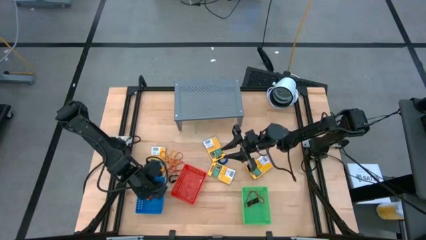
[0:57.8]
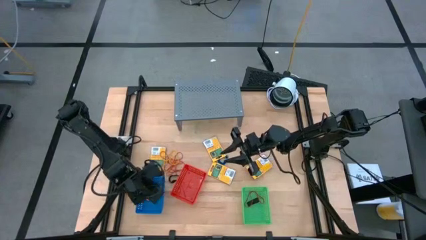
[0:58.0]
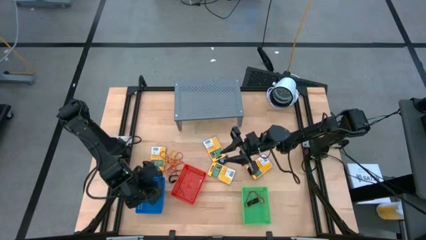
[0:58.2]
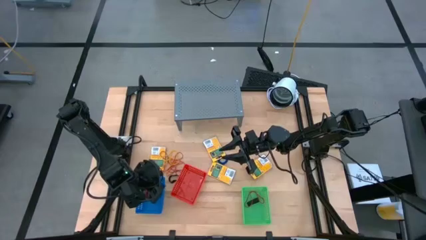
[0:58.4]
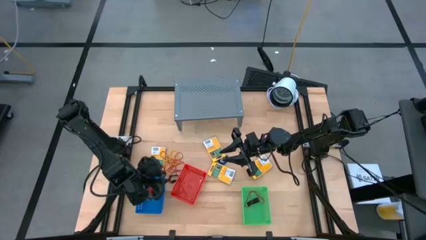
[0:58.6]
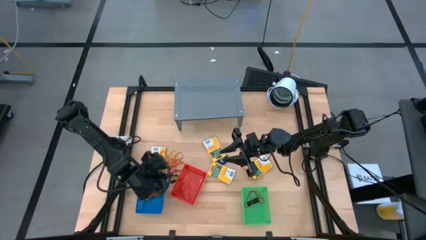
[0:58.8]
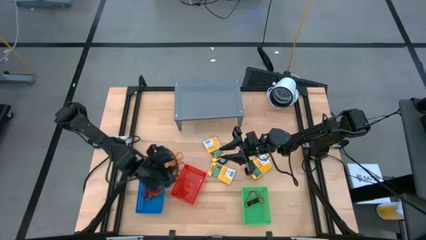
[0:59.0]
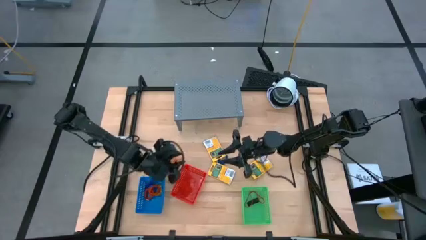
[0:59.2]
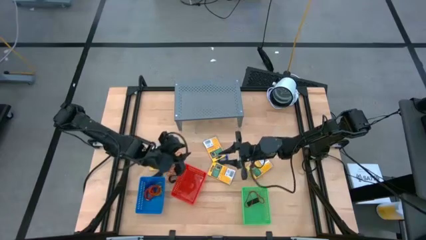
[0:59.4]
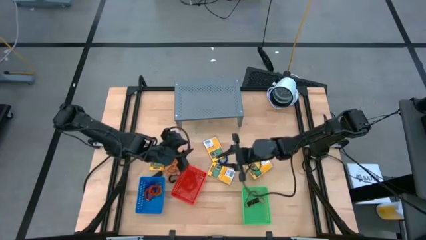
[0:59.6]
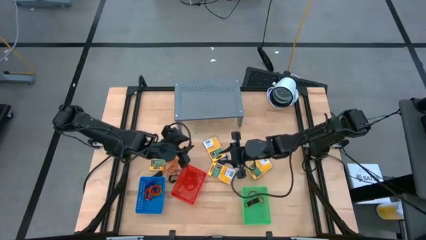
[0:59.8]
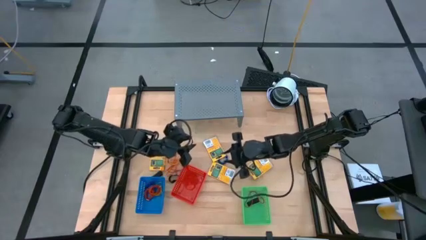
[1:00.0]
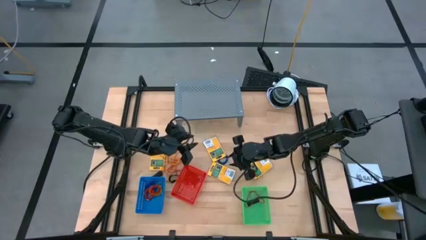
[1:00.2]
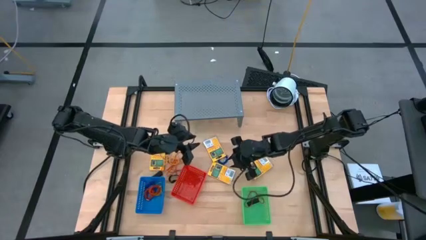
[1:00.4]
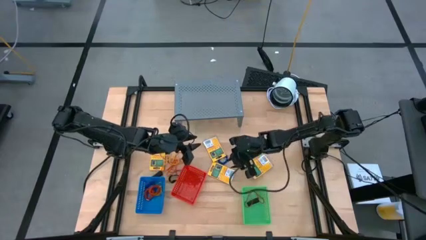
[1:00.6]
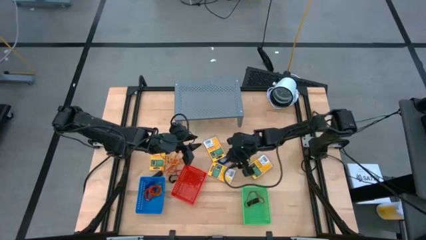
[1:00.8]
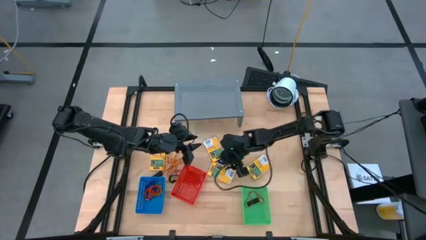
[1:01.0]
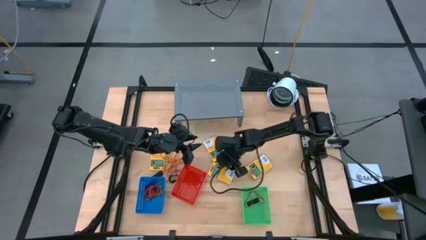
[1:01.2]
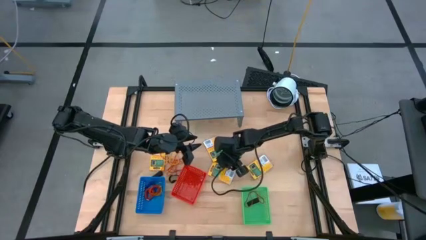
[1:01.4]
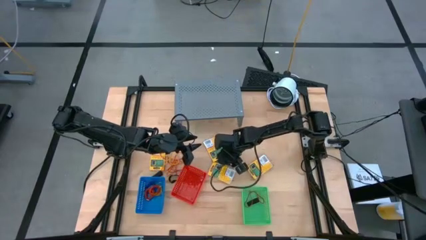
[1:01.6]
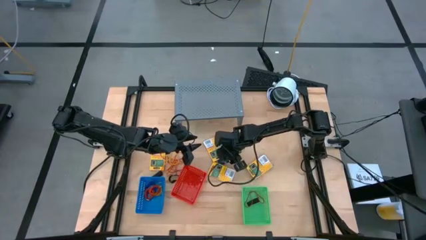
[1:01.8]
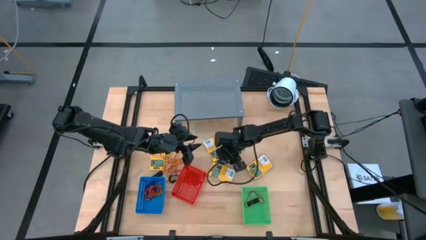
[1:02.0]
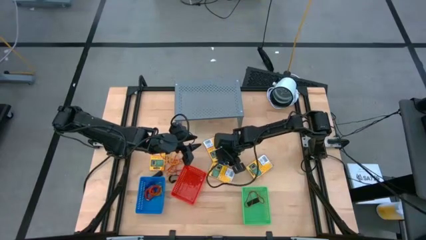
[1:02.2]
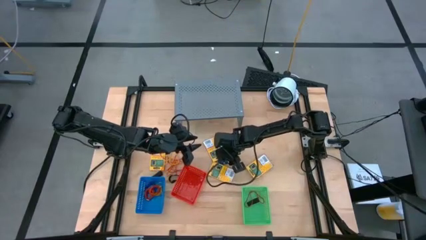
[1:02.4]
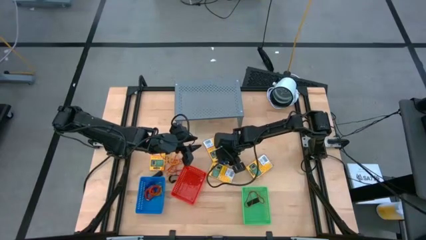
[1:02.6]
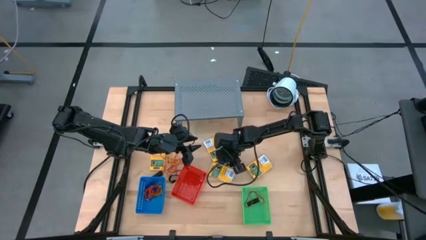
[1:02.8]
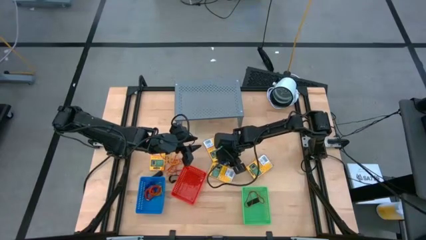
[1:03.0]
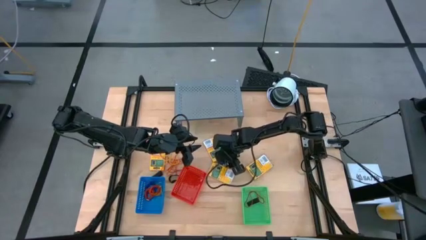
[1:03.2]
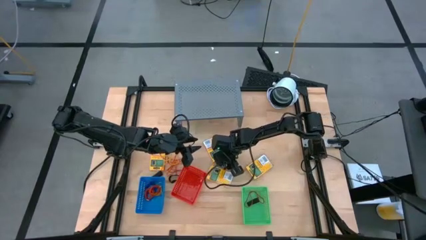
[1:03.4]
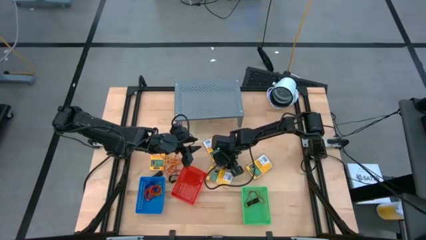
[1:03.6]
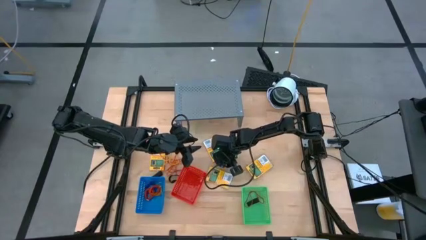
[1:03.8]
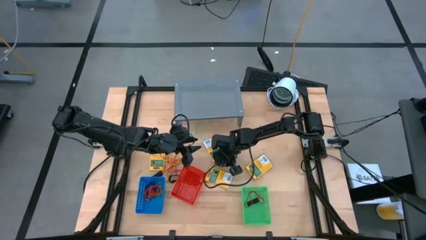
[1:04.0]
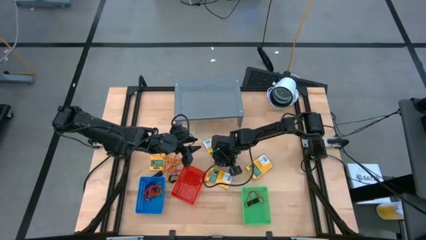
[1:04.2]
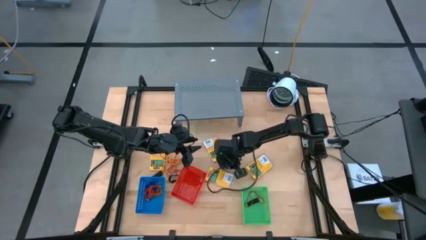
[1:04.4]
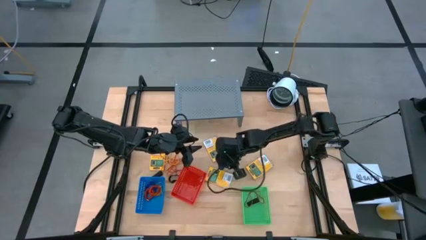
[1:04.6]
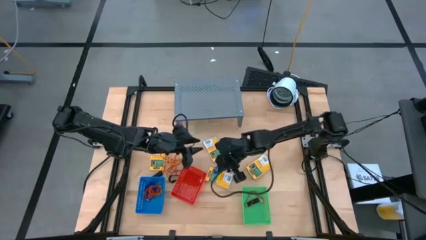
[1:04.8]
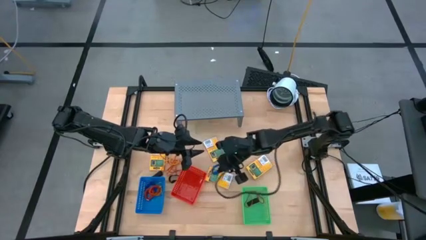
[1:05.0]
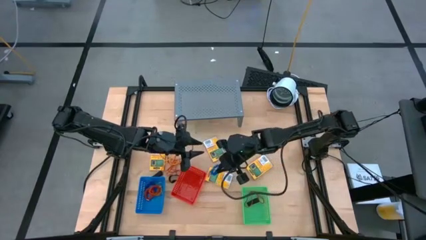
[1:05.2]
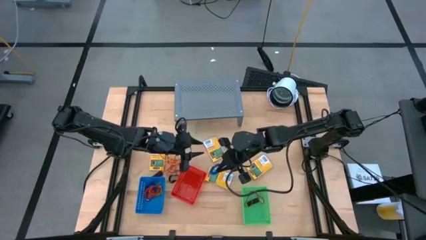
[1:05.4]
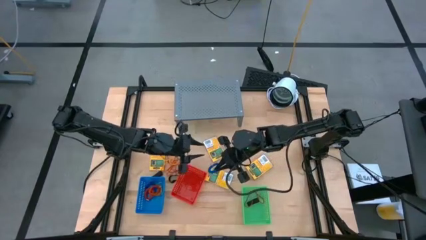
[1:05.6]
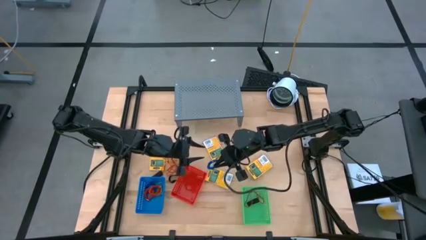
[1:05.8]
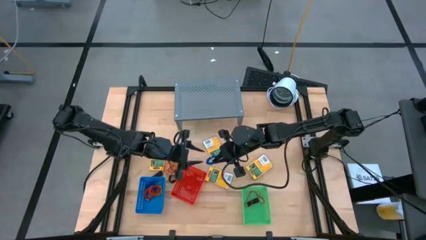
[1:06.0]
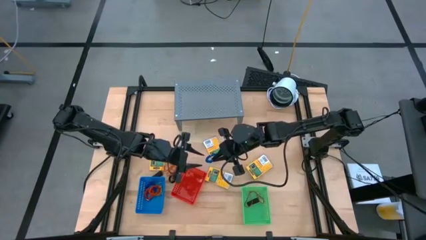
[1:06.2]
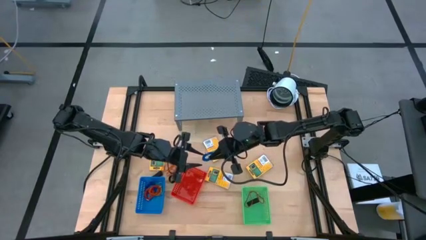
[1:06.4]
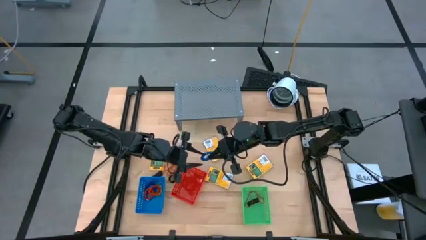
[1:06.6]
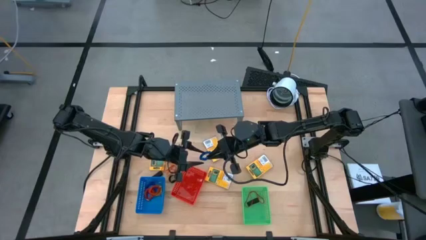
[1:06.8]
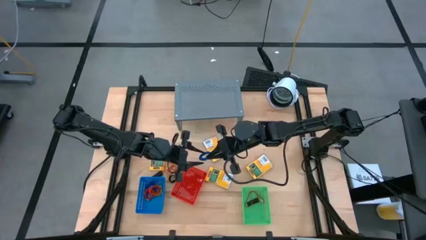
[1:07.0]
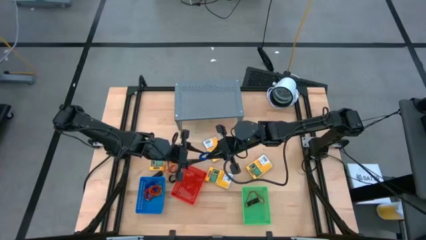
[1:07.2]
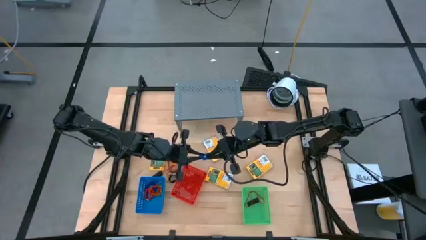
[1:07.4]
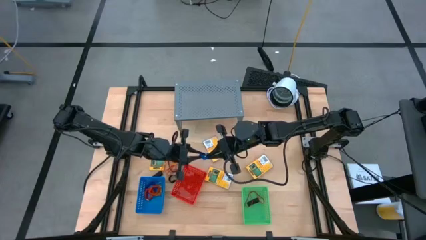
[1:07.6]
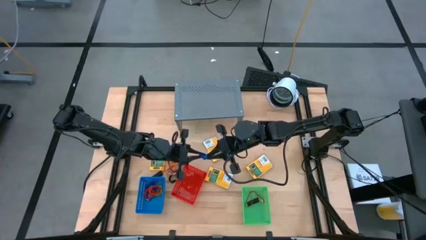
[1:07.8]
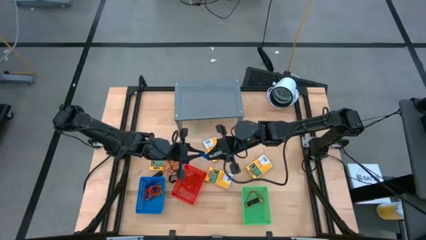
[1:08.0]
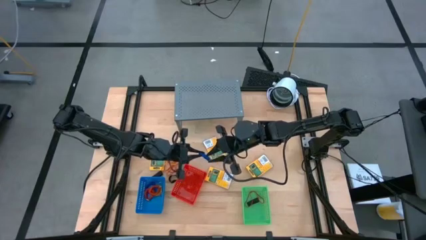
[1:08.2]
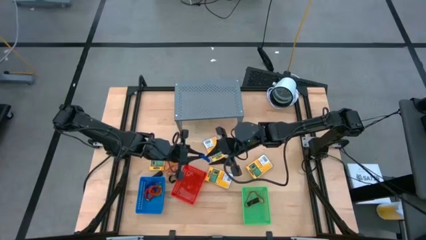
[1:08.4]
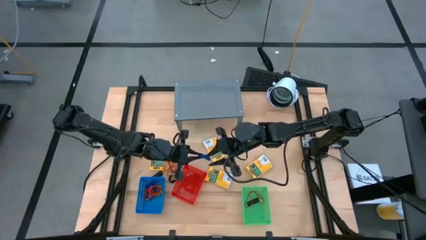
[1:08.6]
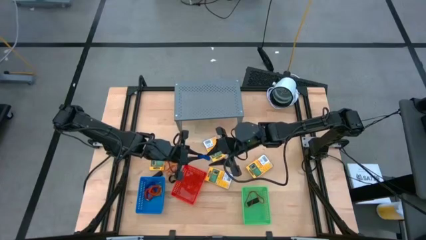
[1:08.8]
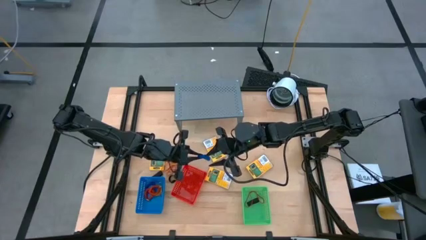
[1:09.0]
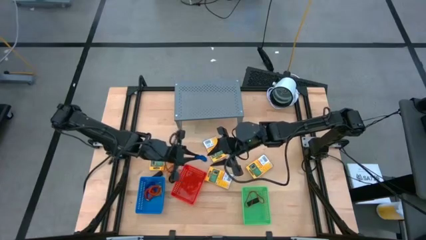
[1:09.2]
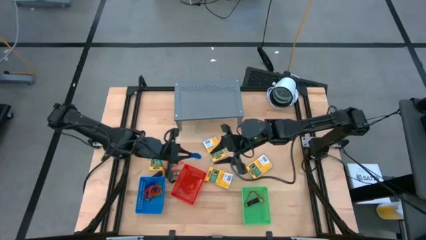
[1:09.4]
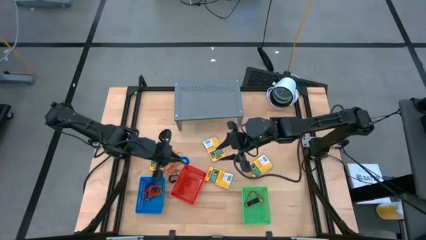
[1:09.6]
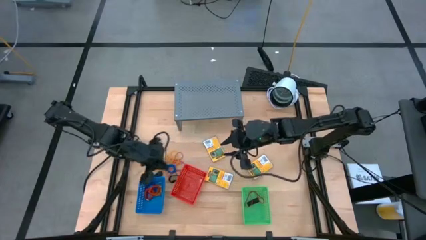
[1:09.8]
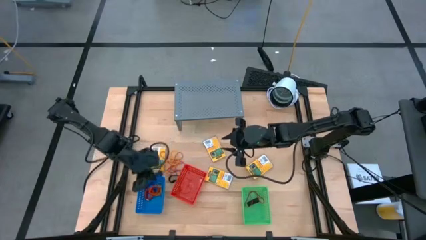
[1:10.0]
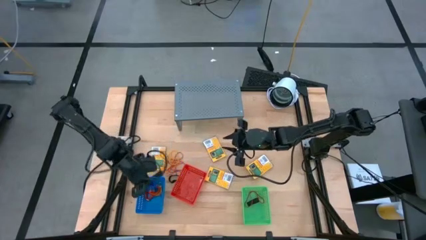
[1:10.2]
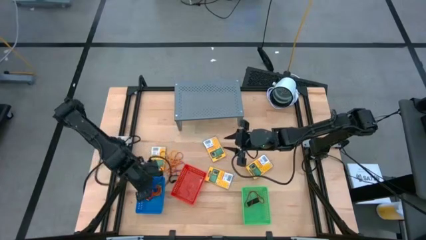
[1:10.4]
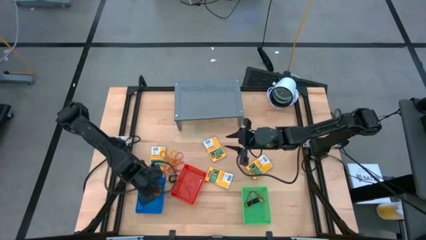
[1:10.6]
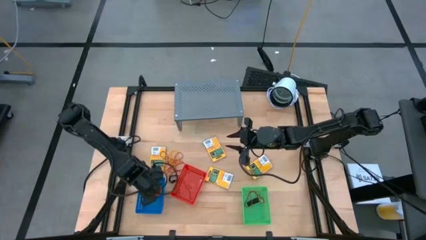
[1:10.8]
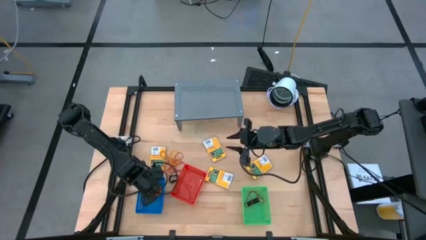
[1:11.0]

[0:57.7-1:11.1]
Task: Pick & Place Office Desk Supplies
Put the blue spring keychain into the blue basket
